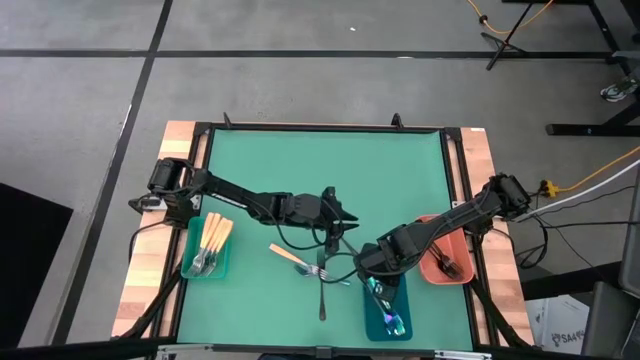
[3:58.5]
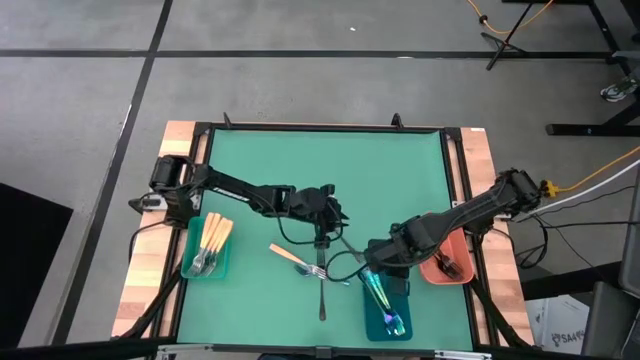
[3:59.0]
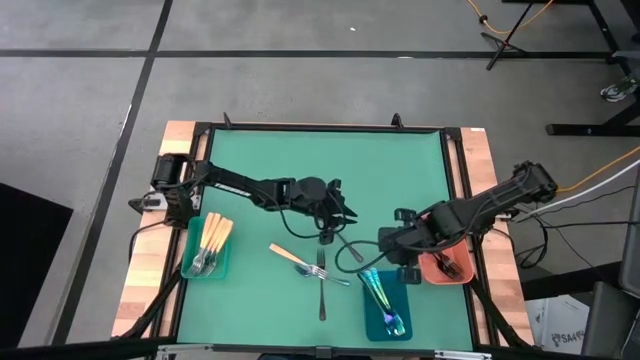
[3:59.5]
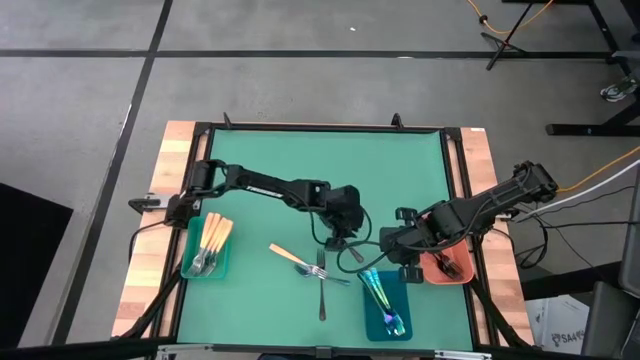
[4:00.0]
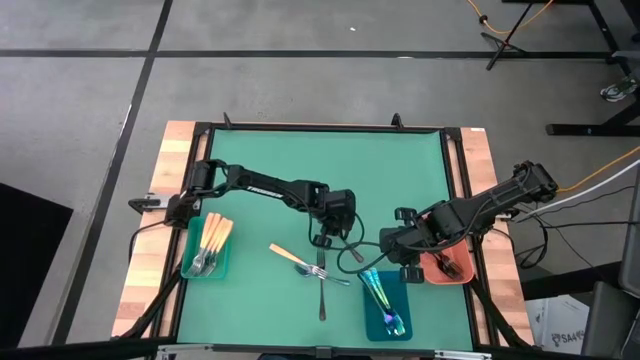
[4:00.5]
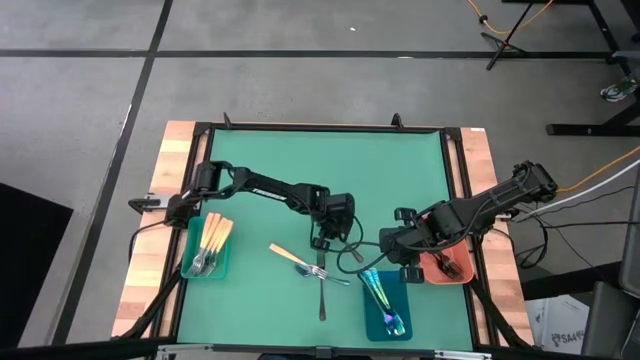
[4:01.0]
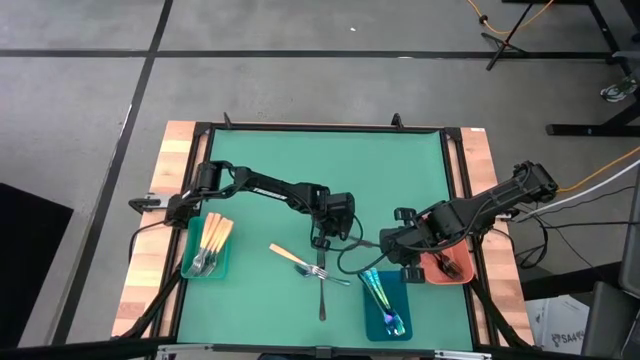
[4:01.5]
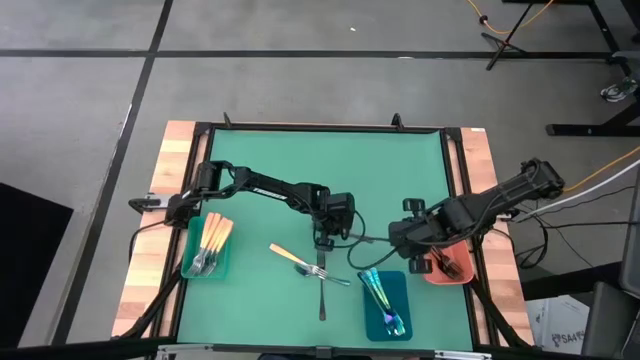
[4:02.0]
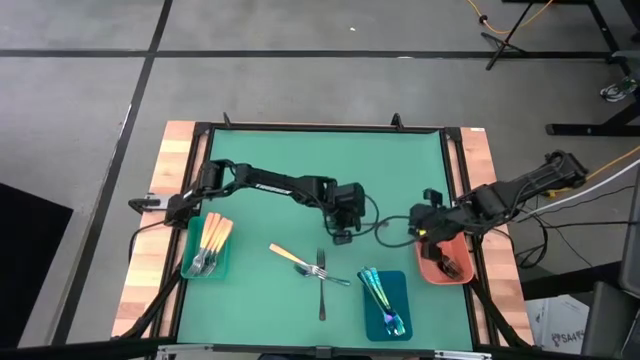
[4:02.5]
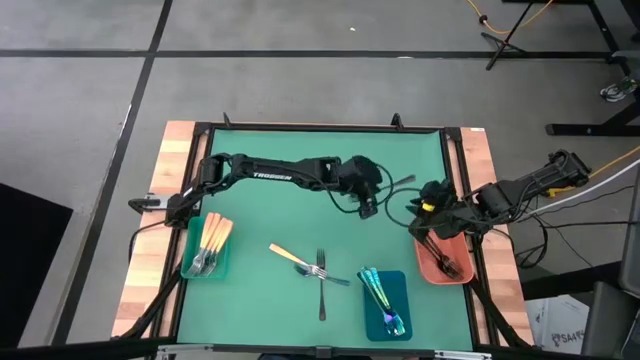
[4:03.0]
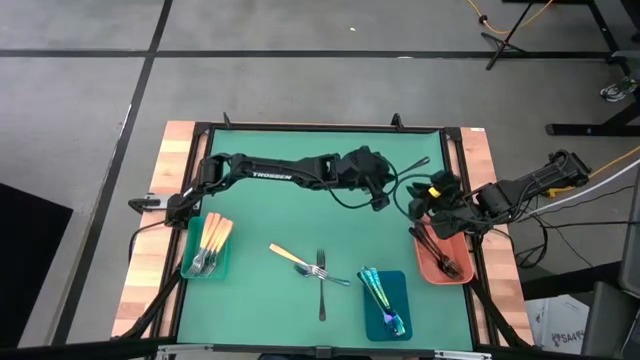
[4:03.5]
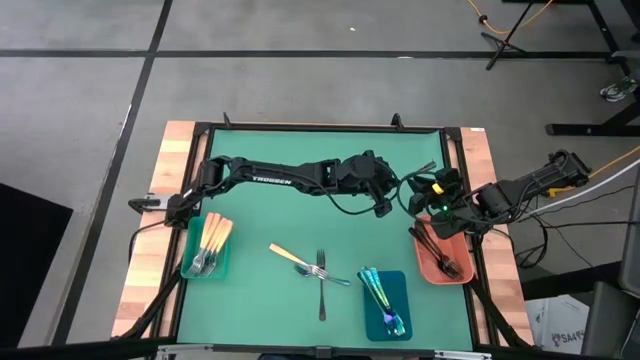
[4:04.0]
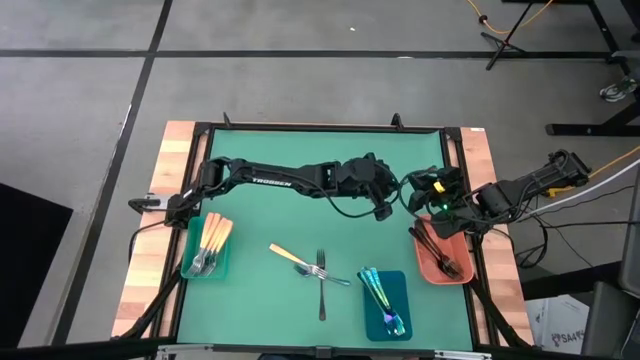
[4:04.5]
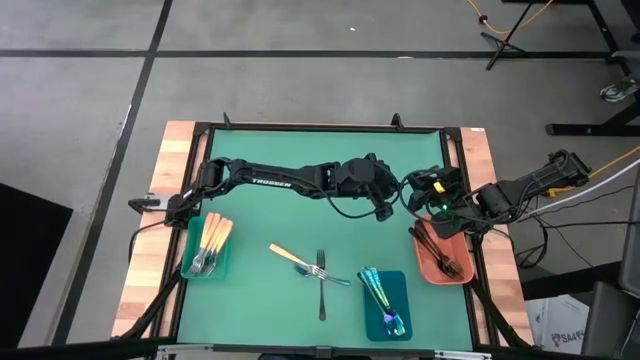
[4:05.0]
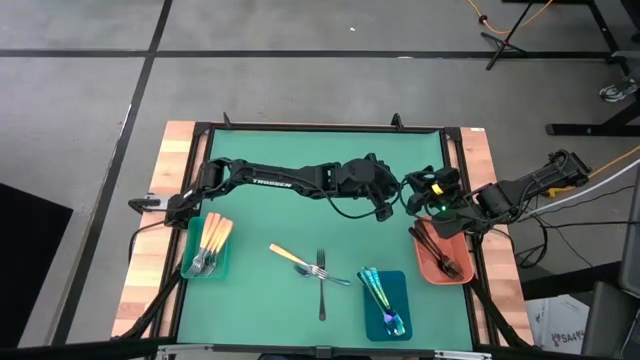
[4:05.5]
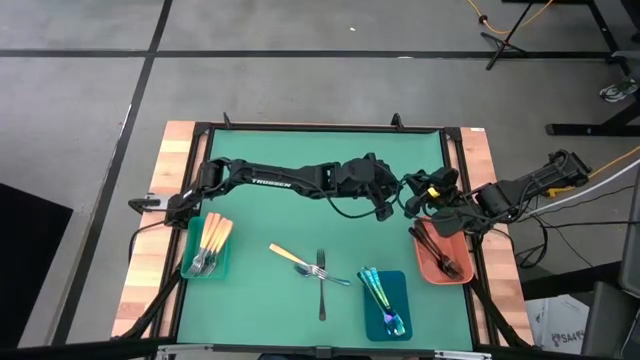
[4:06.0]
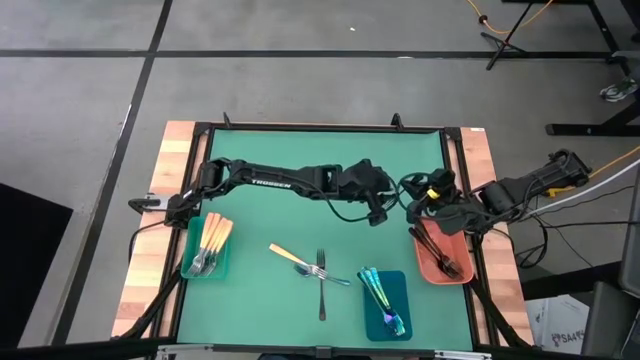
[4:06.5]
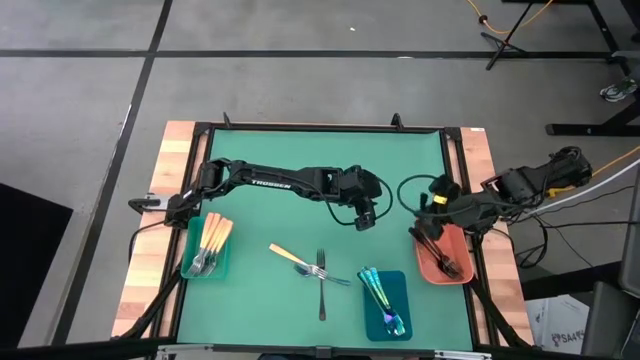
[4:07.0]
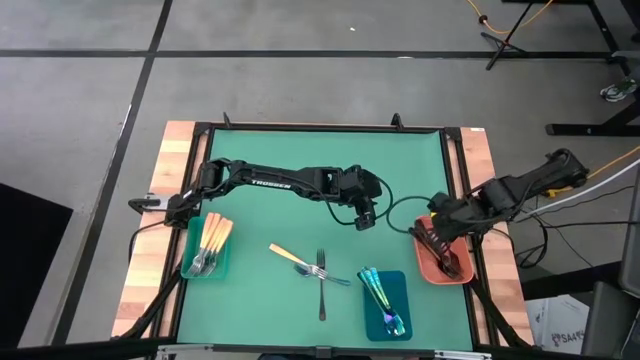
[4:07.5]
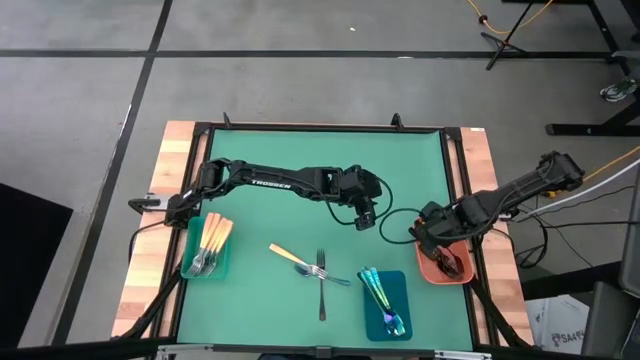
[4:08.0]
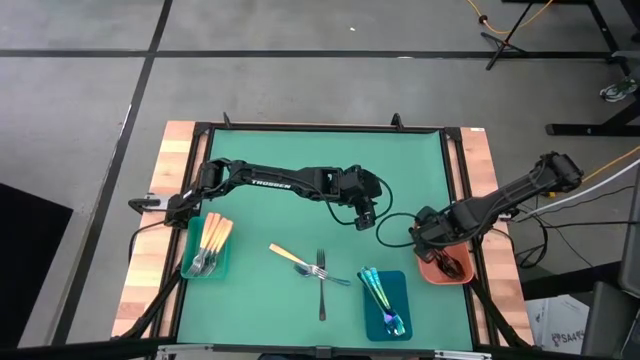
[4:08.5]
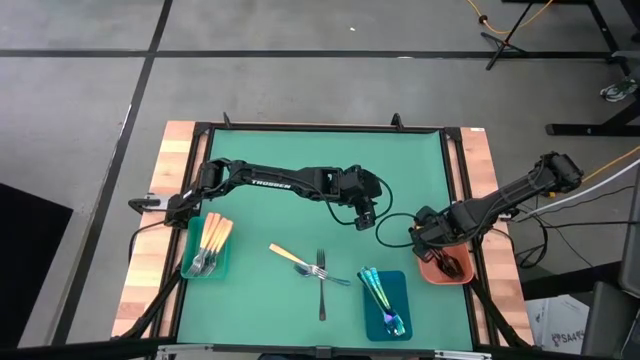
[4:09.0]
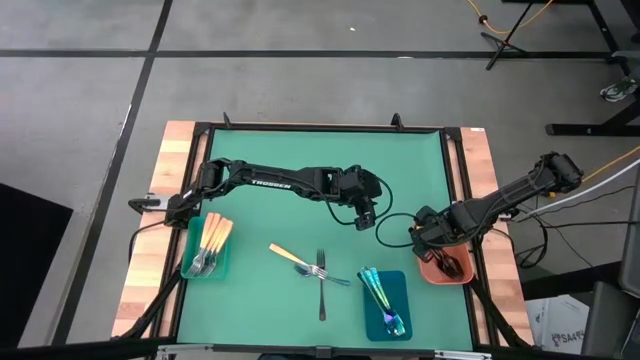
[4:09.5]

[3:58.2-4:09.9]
Task: Sort silverware by color (type)
Put the black fork into the orange bin

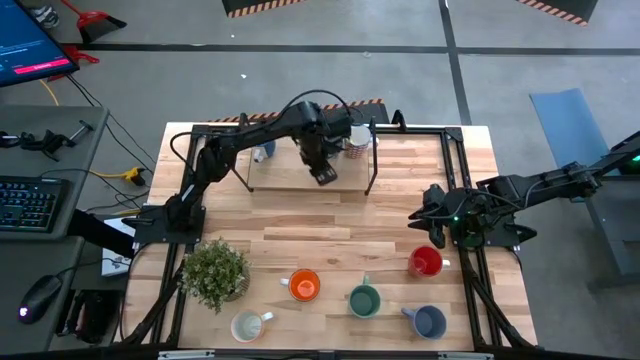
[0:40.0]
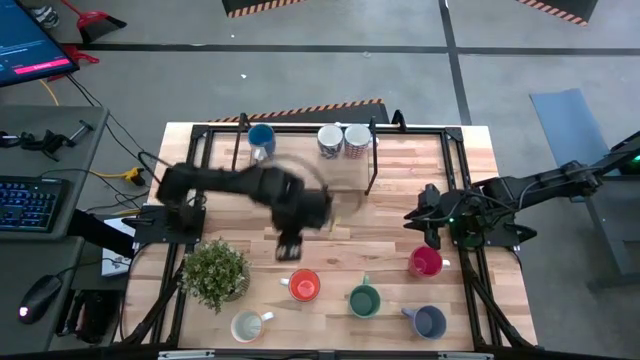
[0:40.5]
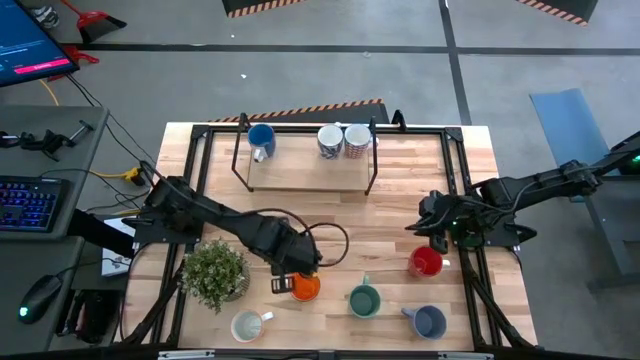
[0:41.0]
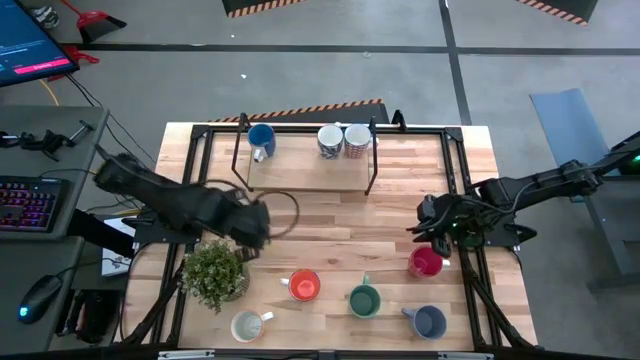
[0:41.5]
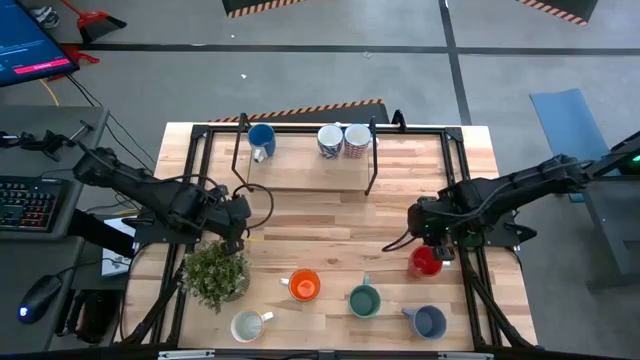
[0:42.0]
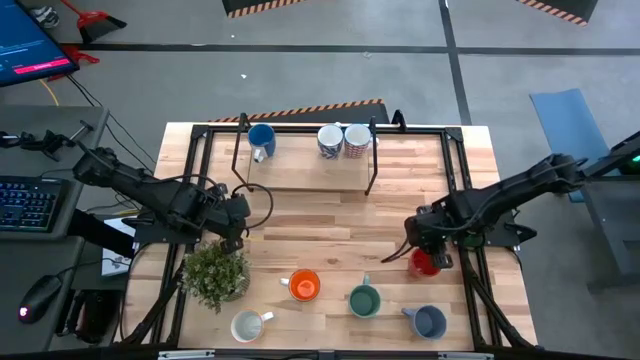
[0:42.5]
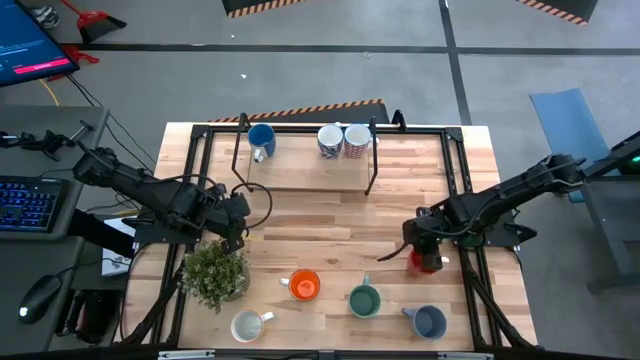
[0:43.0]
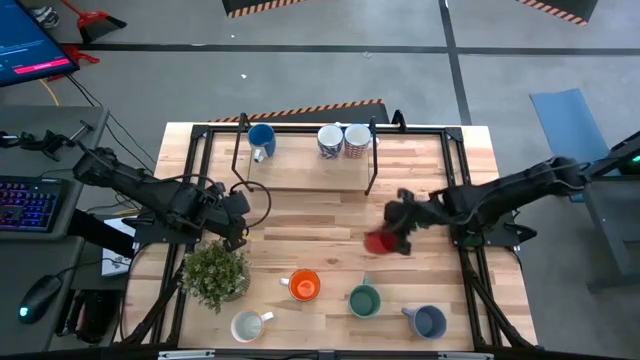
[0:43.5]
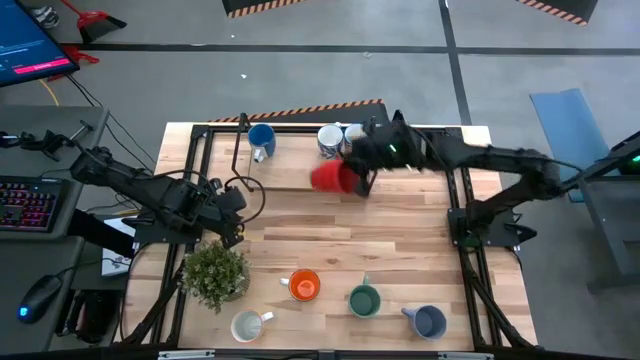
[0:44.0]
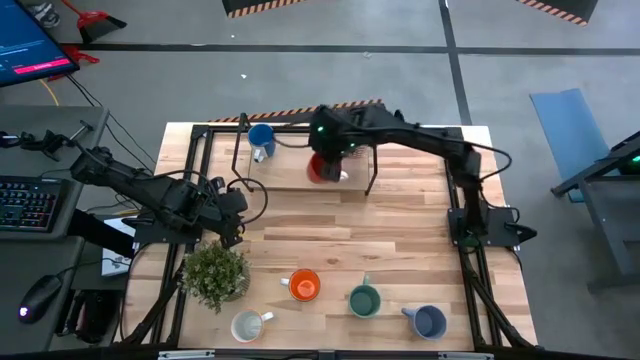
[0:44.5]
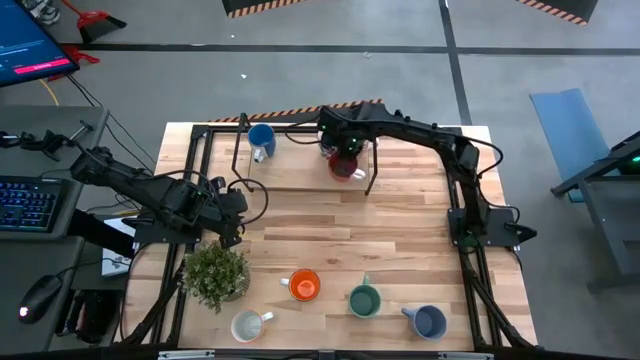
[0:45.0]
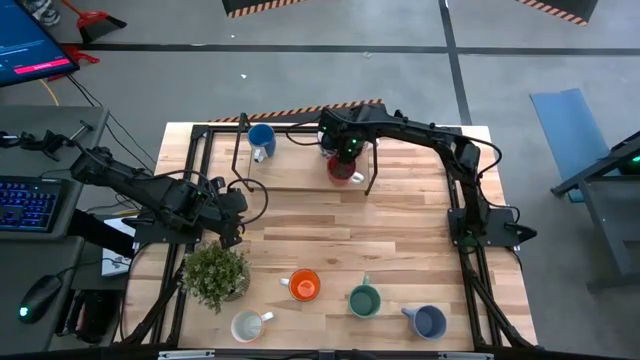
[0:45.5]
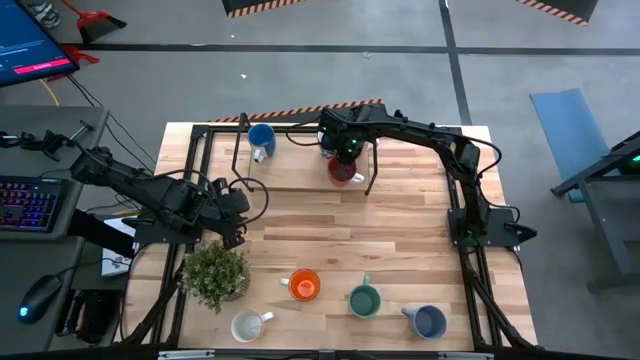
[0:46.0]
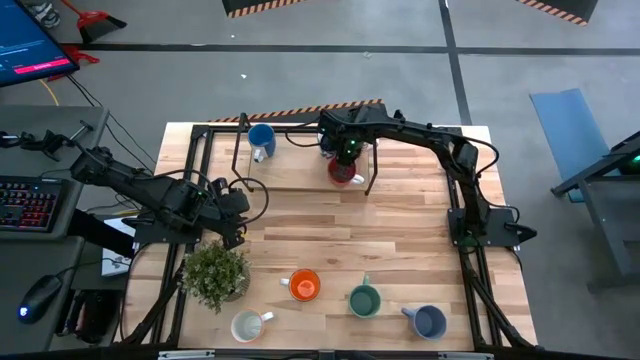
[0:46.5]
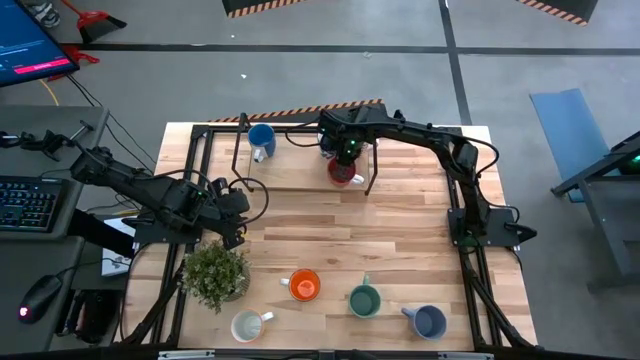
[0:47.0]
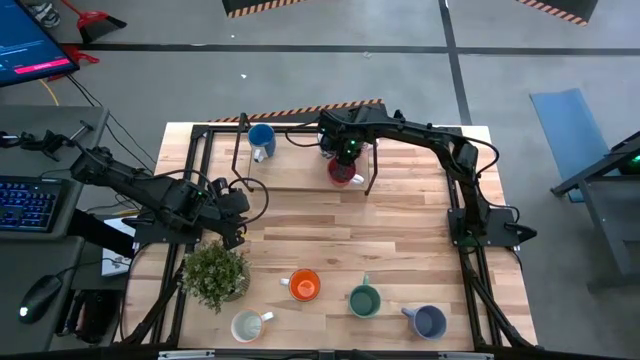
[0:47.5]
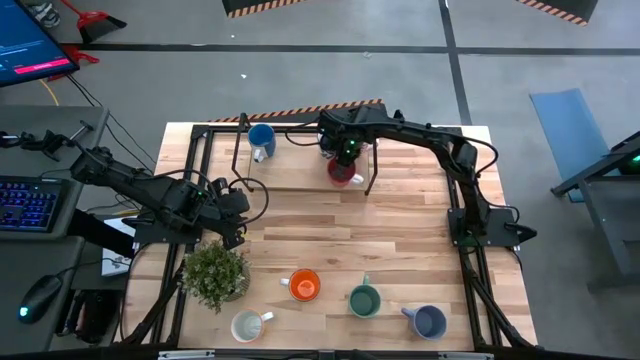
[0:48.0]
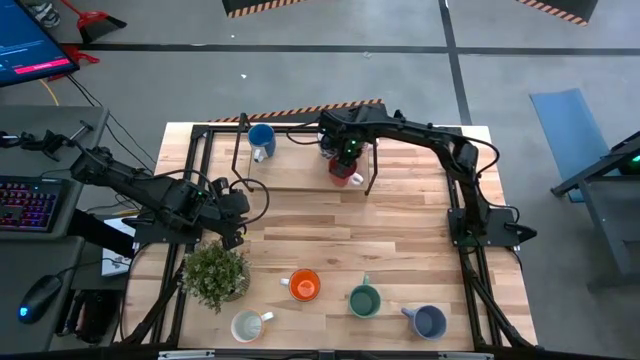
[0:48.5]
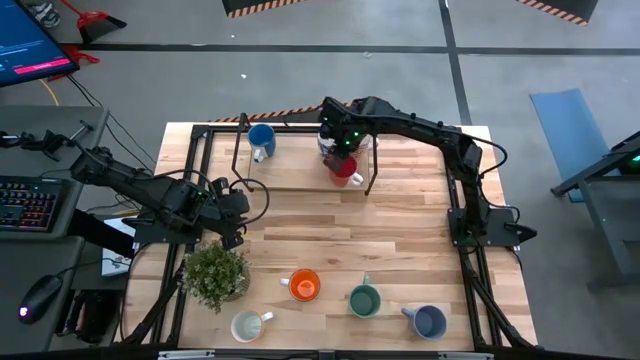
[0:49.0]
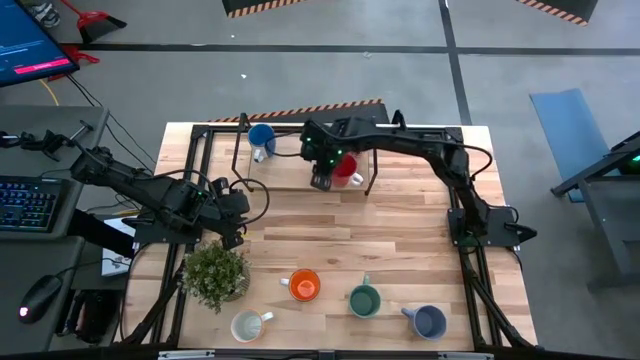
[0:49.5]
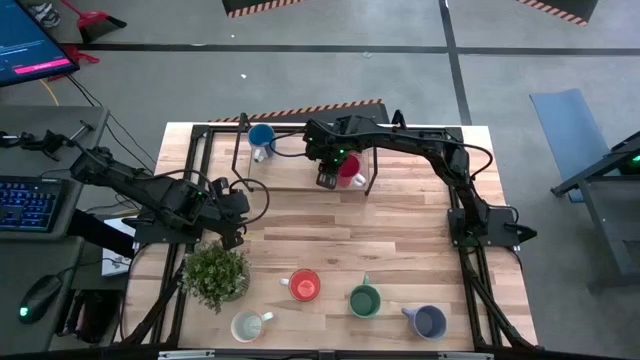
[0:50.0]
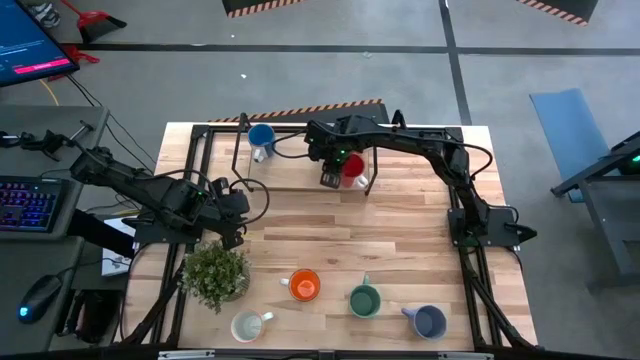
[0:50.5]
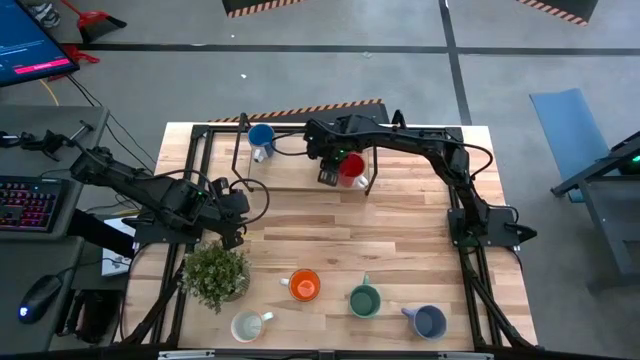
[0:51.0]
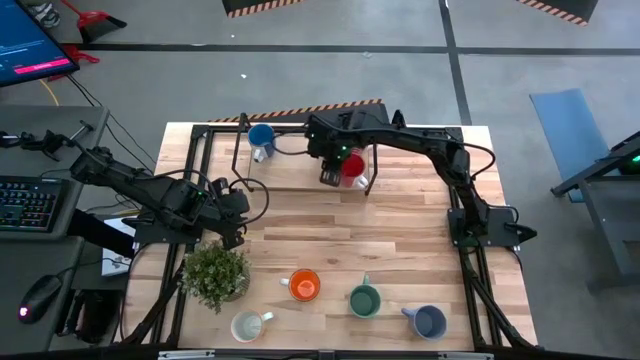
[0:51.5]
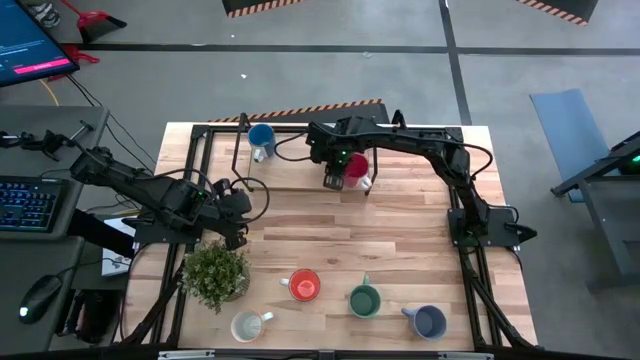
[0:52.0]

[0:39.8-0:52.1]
Task: Place coffee mugs
Put the red mug on the shelf
